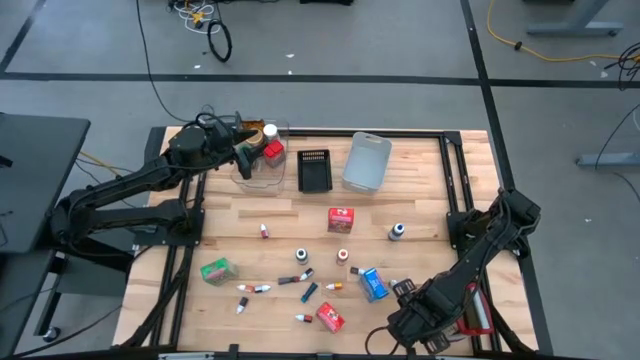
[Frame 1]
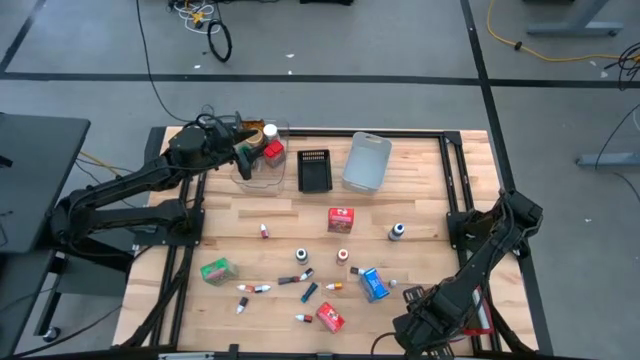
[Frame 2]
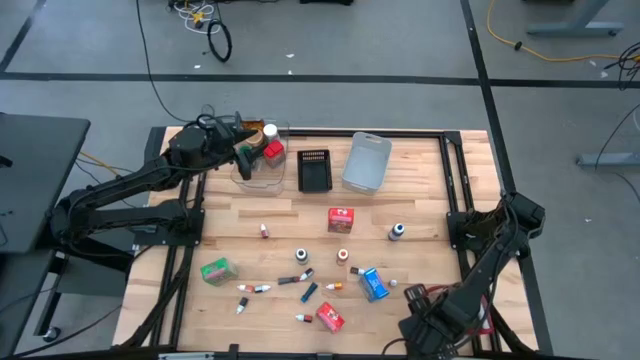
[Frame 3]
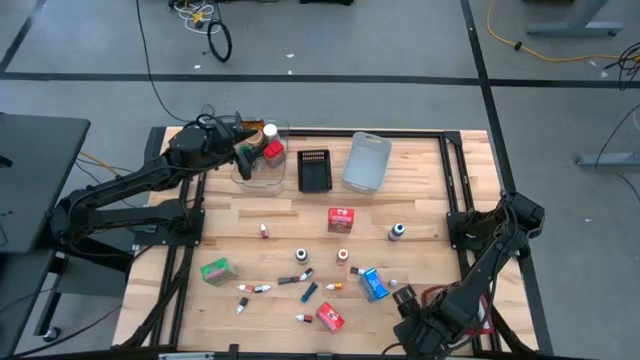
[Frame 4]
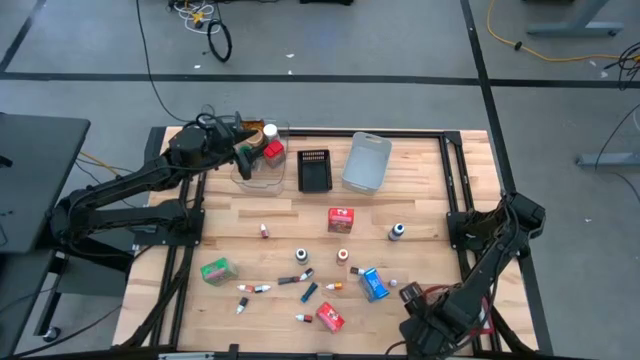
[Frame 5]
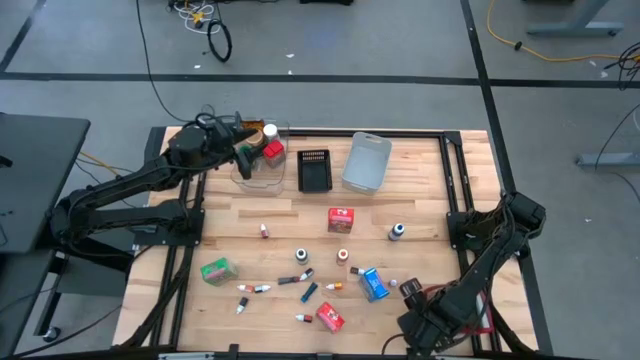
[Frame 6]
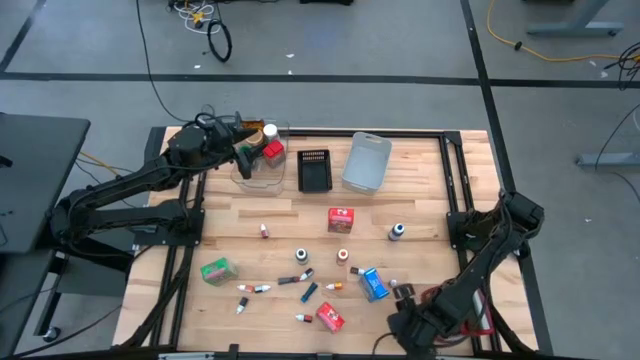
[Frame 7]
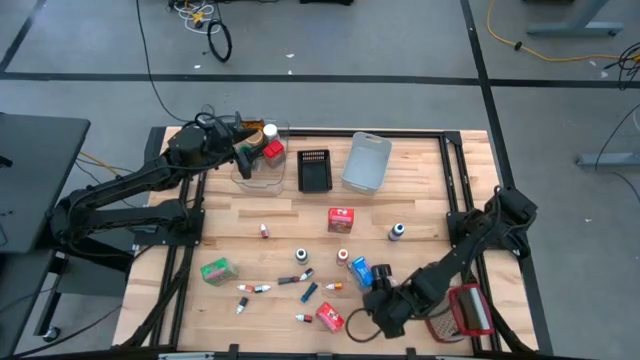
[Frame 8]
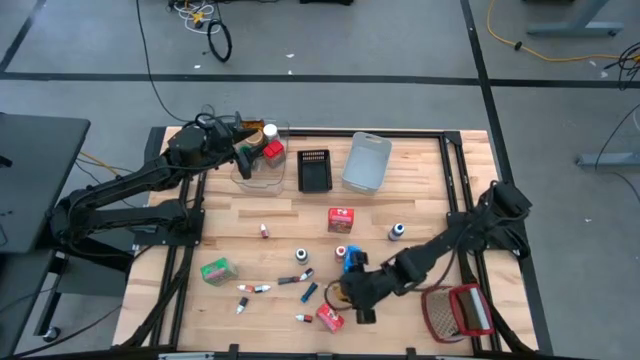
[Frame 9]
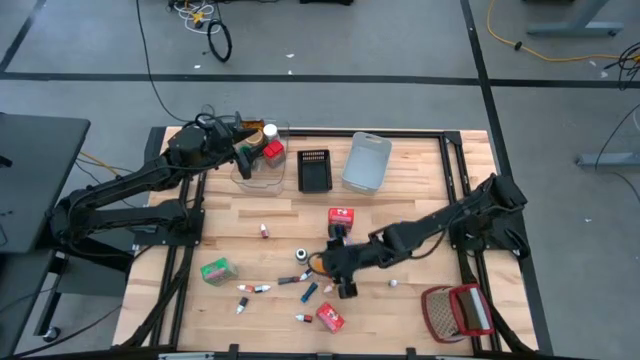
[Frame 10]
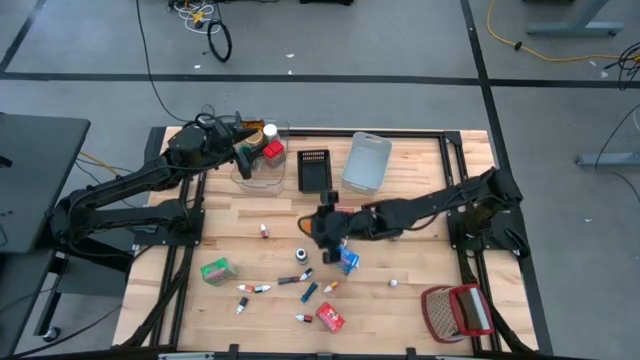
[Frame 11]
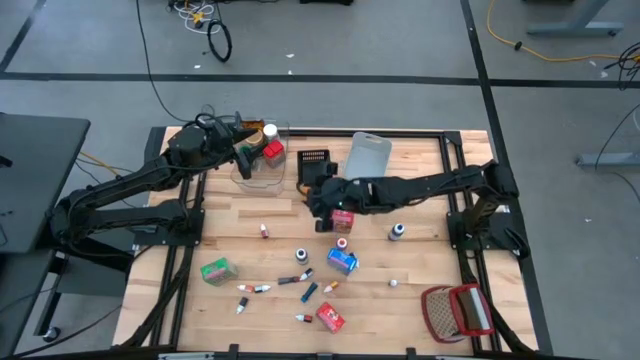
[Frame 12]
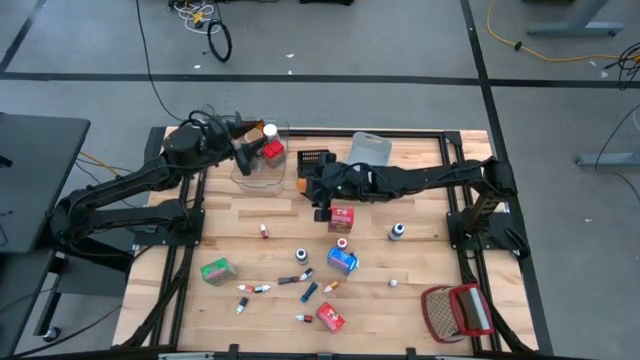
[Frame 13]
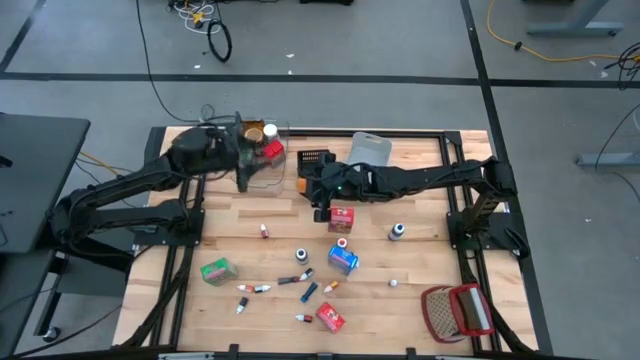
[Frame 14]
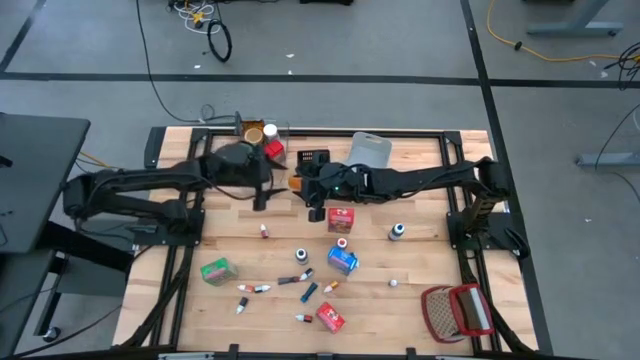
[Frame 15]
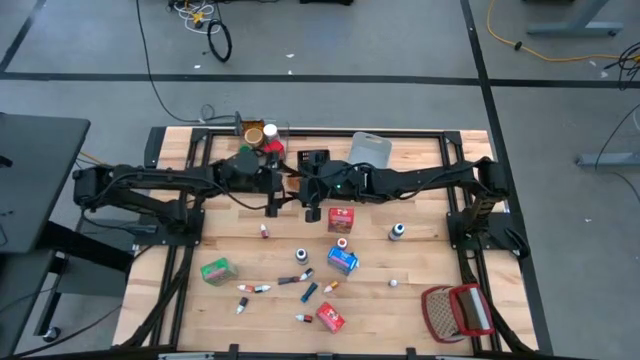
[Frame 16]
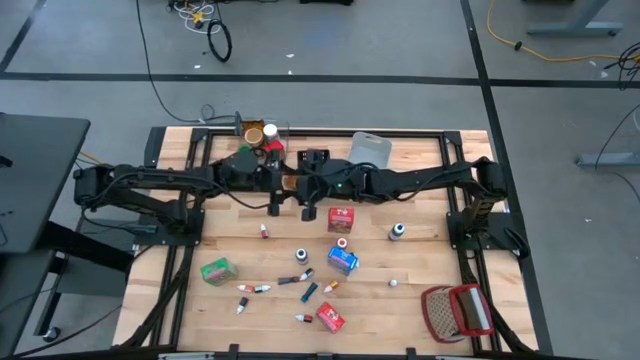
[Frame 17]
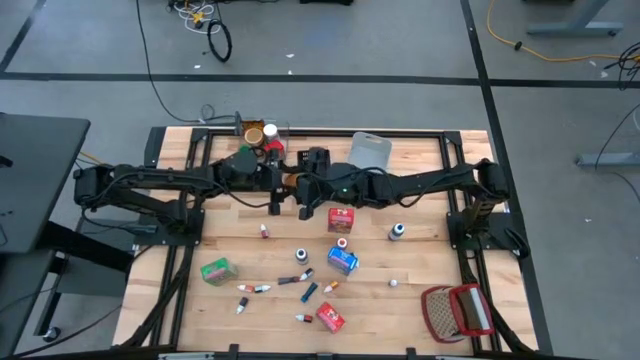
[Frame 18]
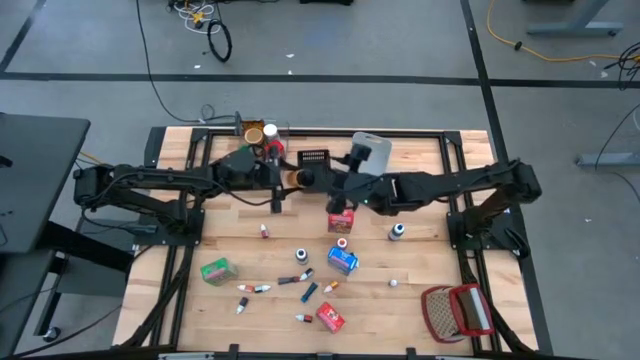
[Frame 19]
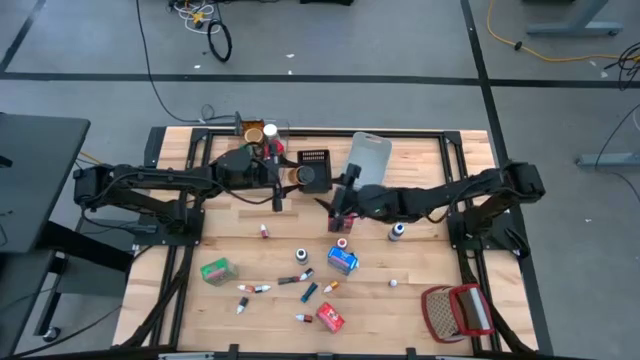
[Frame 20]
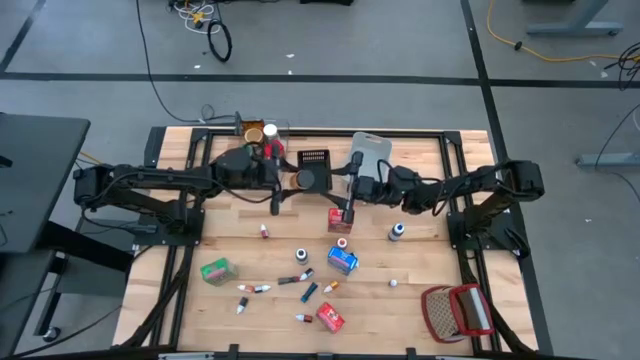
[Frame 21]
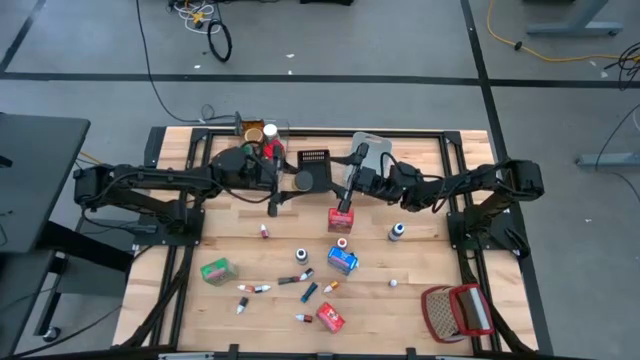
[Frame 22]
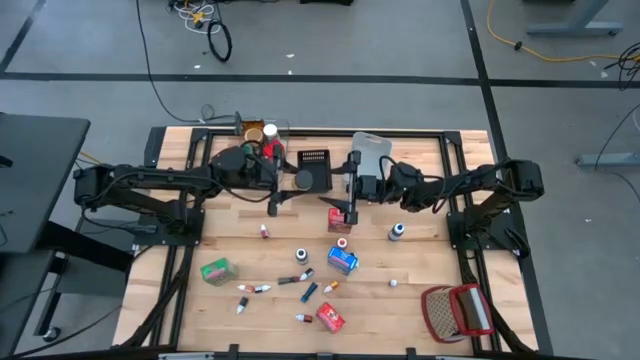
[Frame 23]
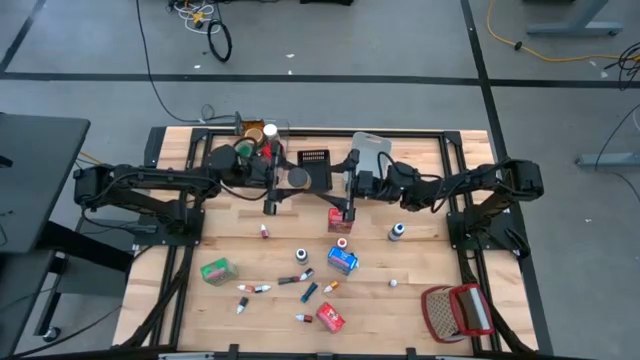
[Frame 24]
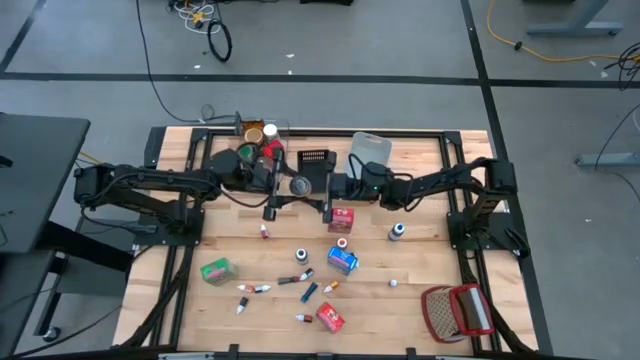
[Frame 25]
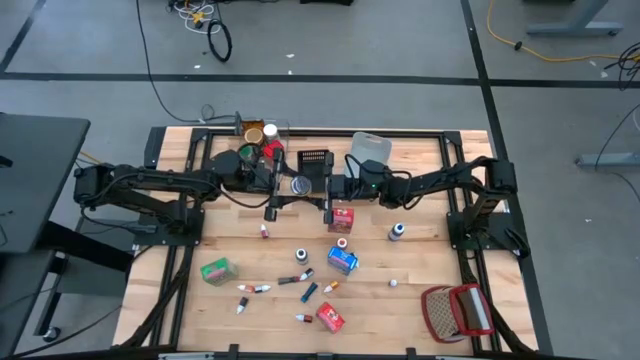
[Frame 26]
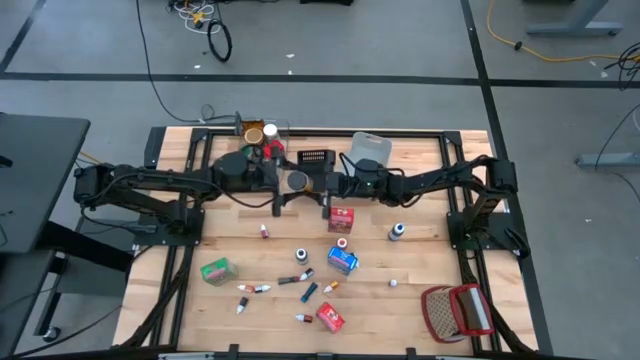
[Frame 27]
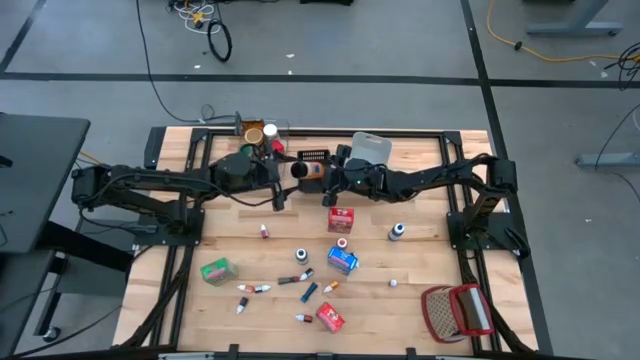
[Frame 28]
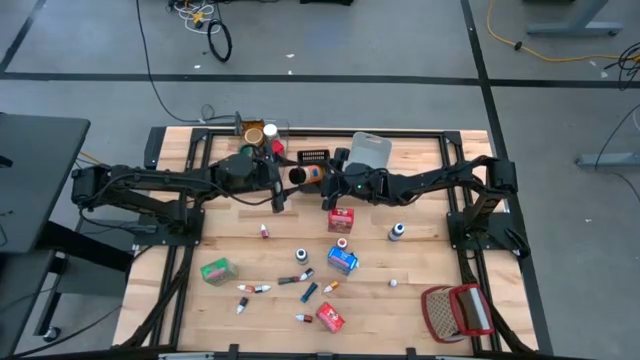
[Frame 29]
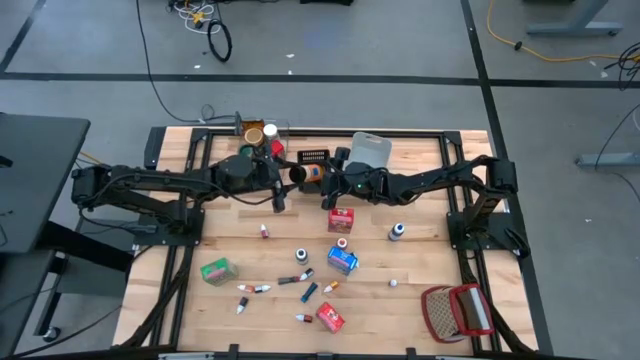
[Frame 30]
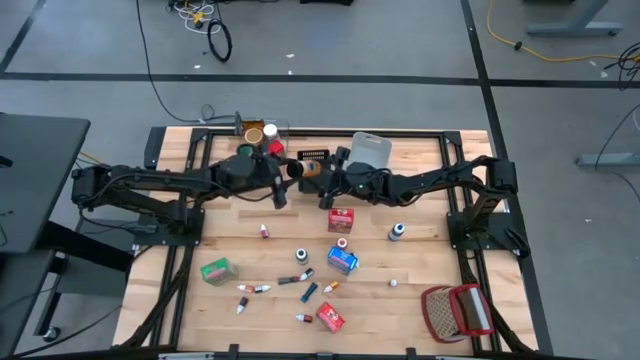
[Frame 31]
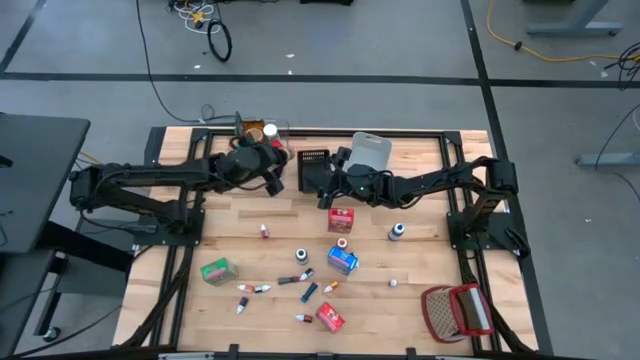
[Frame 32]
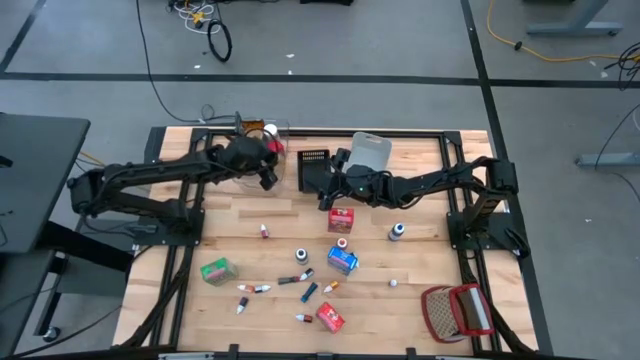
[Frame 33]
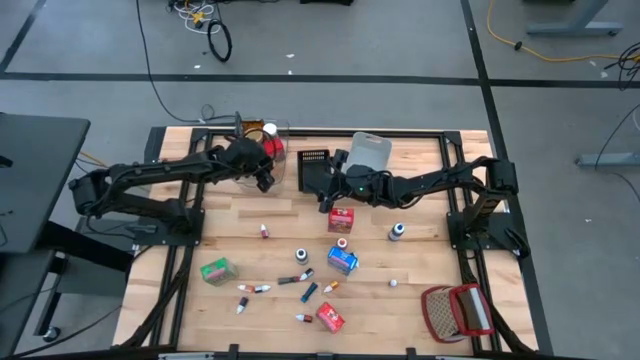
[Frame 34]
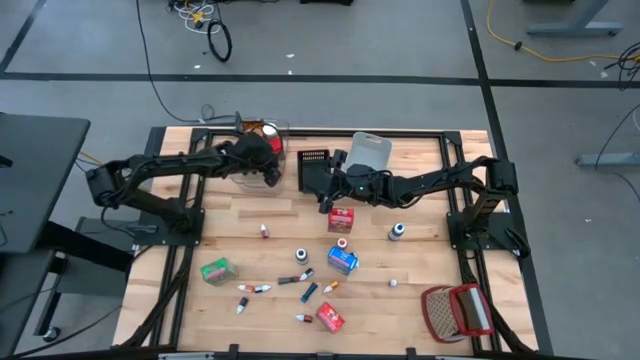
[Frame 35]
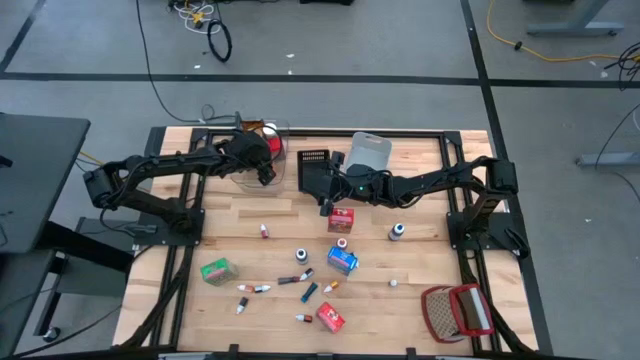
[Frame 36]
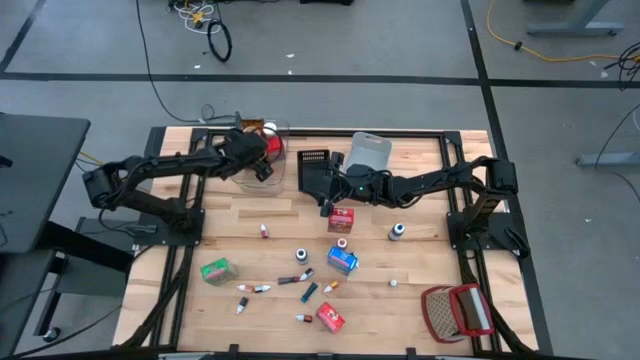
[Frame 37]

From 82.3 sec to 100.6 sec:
Task: Pick & Place Kitchen Items
Put the black seasoning bottle into the transparent bin

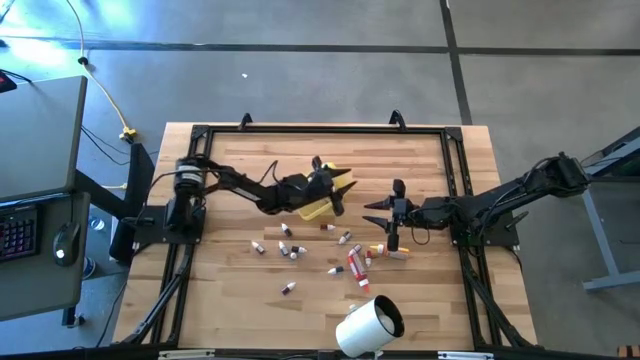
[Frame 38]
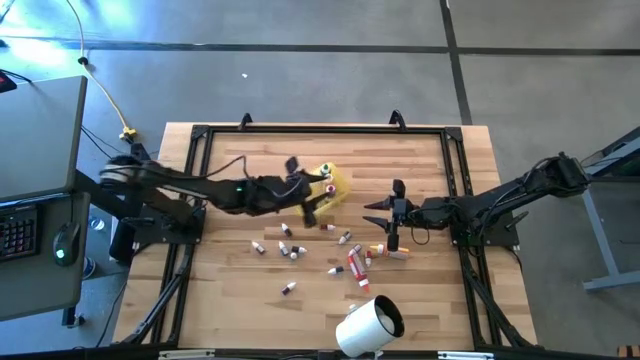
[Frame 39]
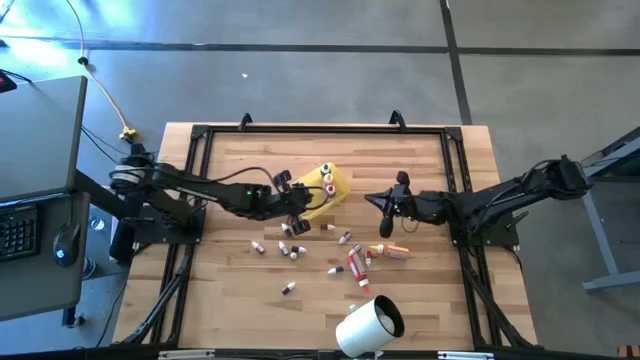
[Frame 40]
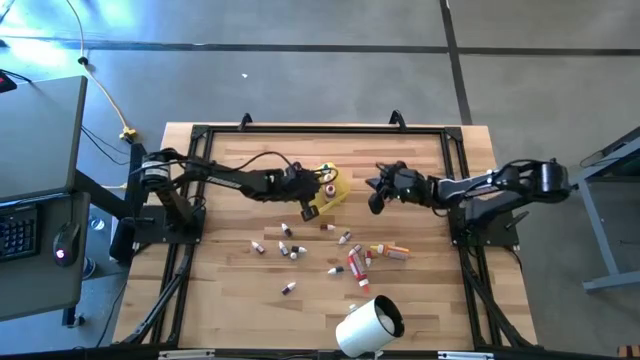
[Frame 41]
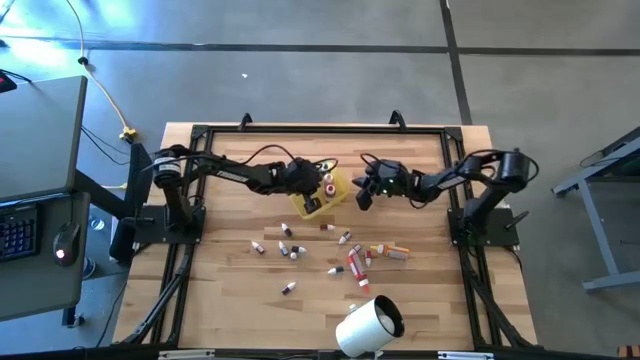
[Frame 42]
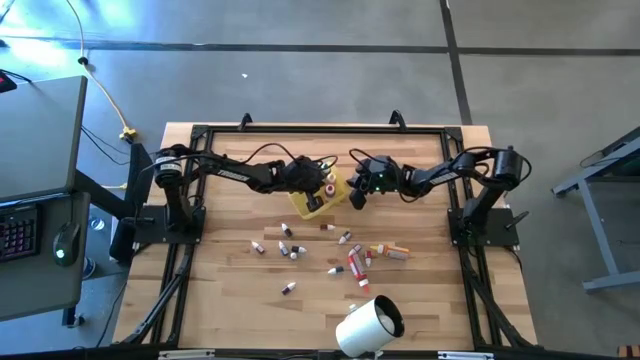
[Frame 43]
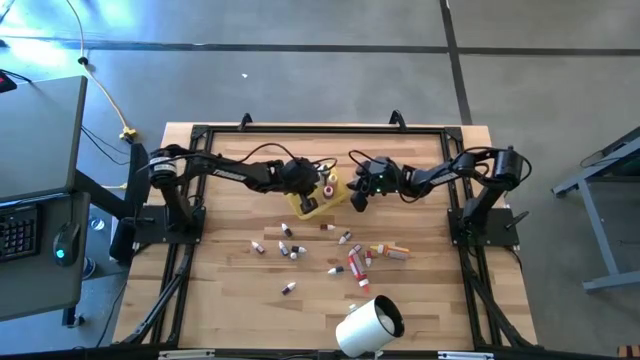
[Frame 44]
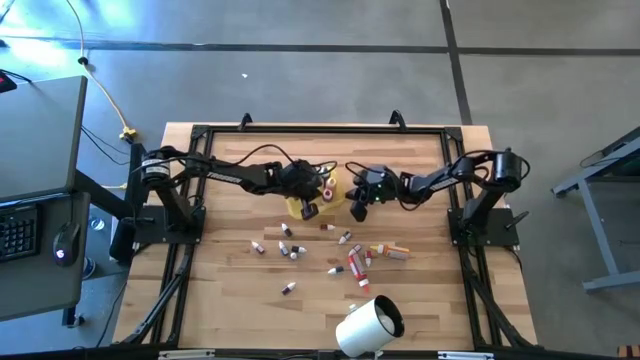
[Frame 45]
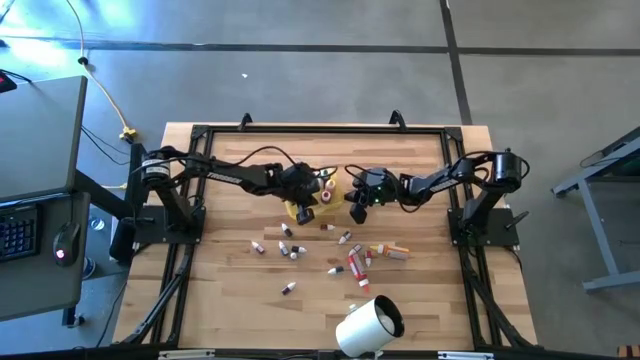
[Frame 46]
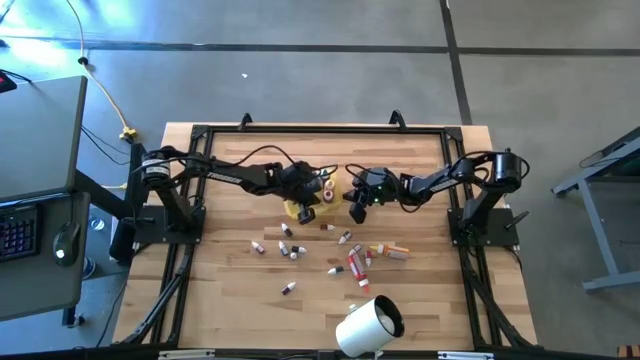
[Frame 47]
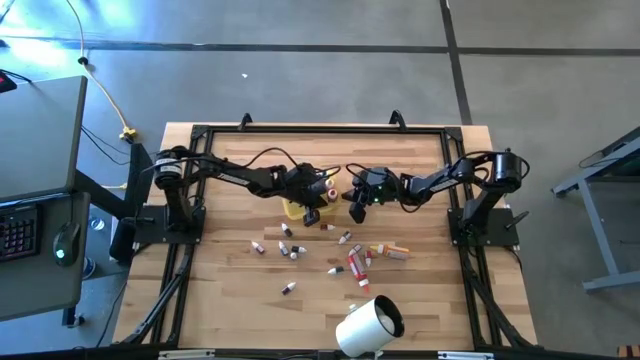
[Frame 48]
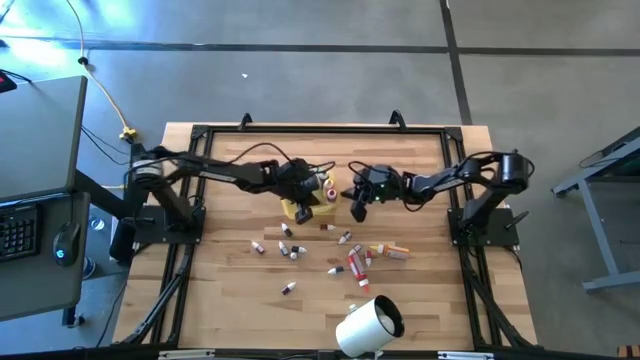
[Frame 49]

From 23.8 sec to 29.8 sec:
Task: Pick & Place food coloring
Adjust the food coloring bottles into the yellow container
